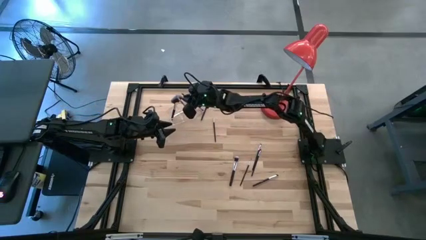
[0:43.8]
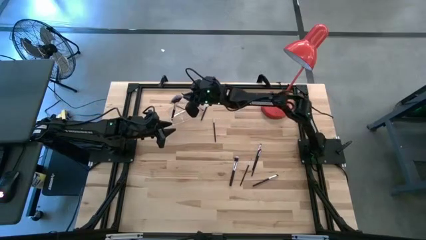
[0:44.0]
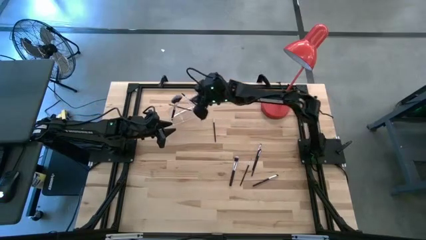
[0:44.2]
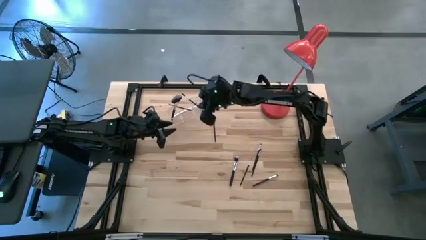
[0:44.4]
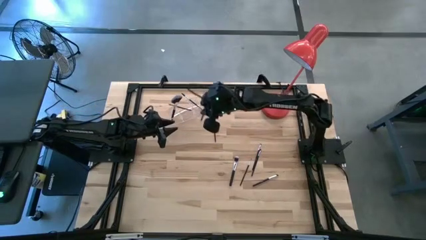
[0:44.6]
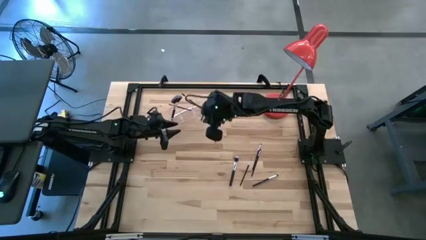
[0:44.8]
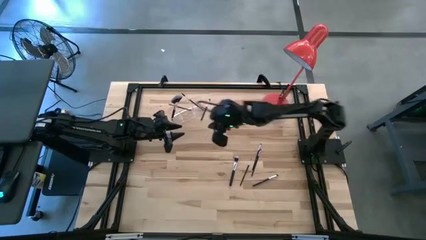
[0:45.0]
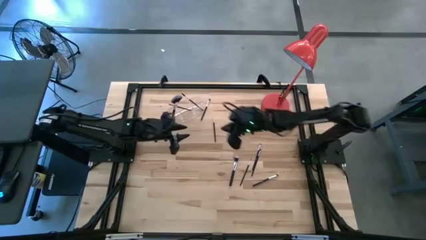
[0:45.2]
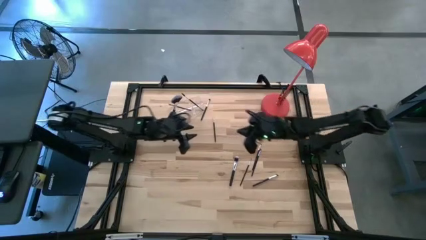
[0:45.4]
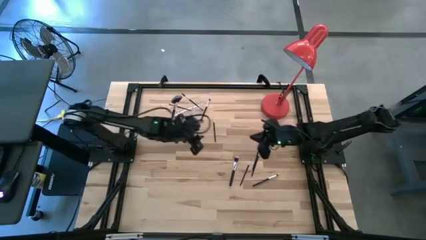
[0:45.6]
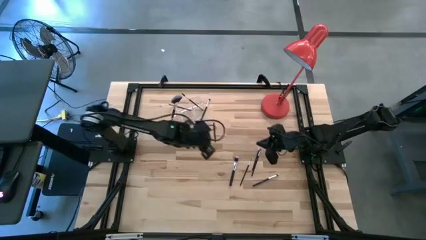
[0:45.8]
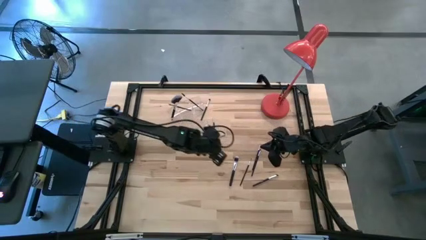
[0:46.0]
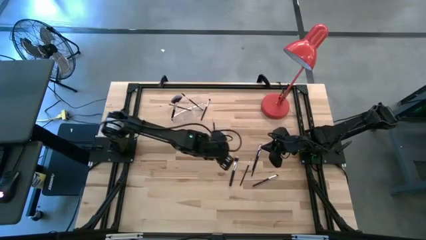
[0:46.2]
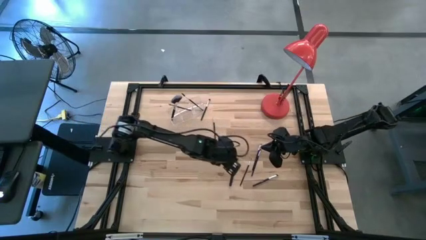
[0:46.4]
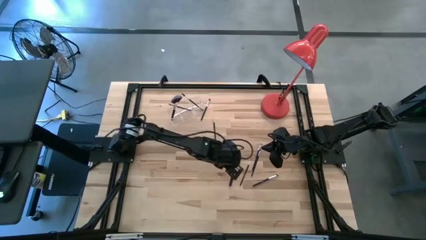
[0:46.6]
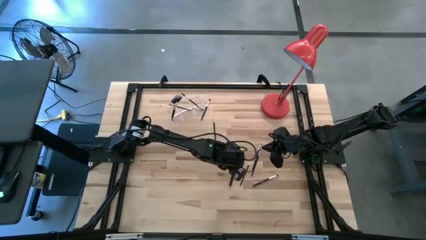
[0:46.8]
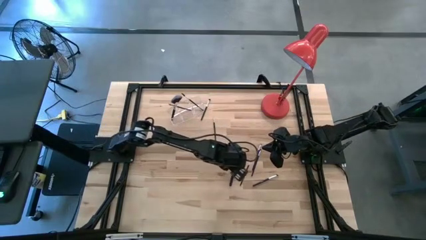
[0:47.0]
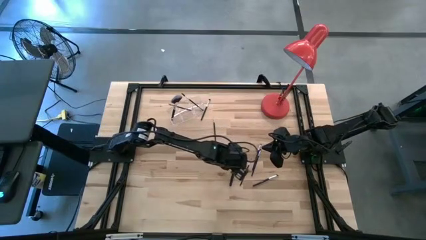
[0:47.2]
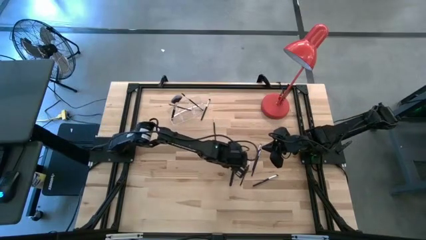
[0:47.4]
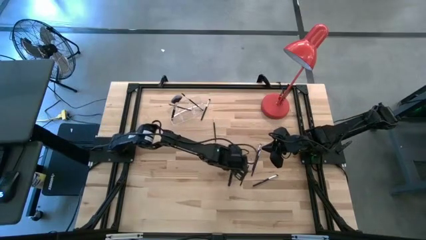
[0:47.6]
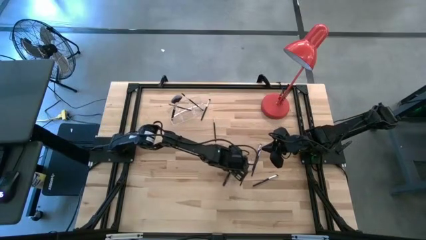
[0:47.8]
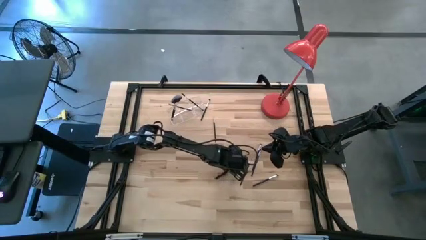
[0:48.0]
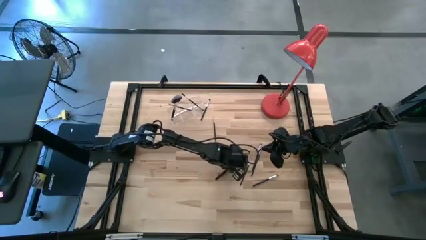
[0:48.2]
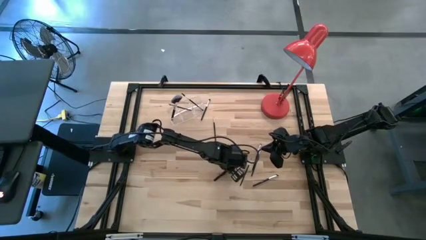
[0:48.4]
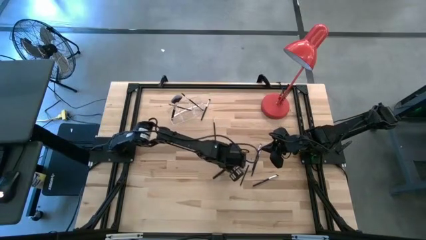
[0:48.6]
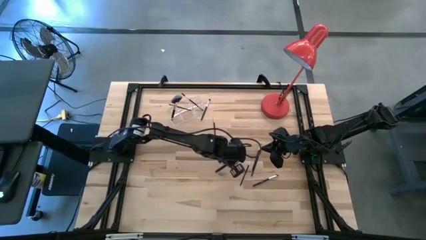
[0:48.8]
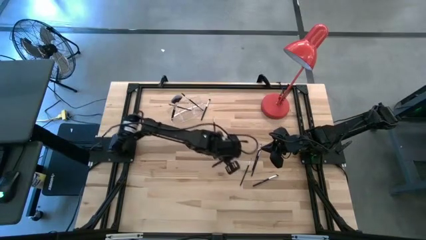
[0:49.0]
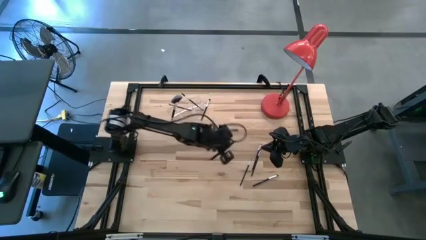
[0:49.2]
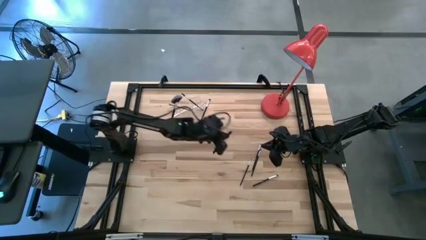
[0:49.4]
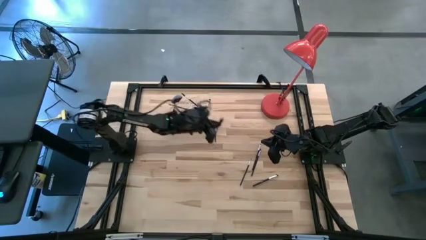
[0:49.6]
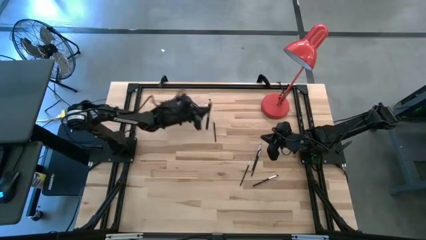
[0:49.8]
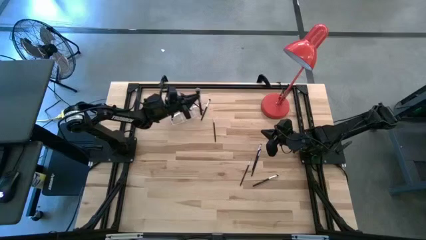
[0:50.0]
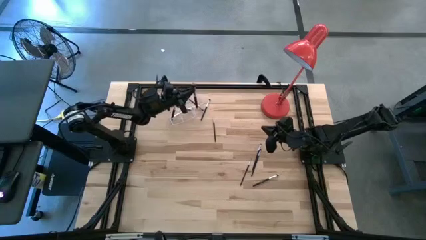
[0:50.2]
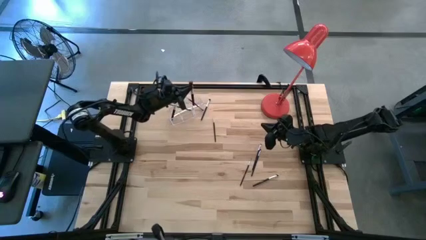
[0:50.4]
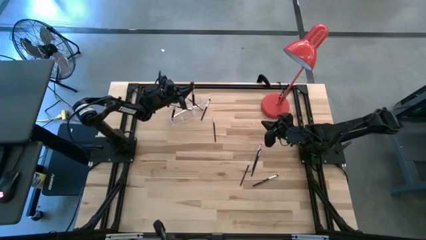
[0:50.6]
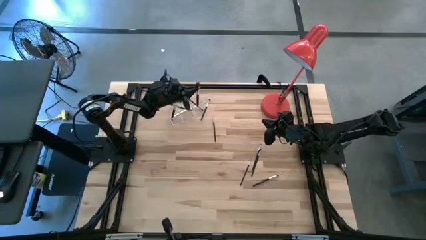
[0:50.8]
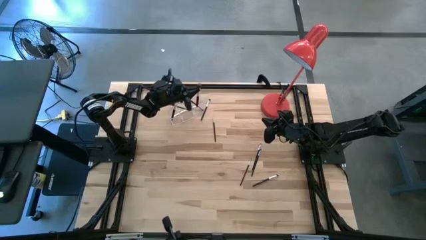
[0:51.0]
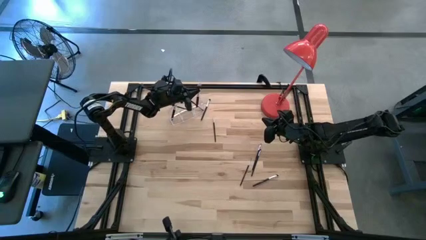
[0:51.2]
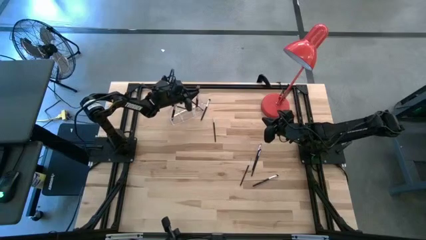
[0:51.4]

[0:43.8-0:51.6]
Task: Put items in baskets/containers
Put the foundation brush into the transparent organizer

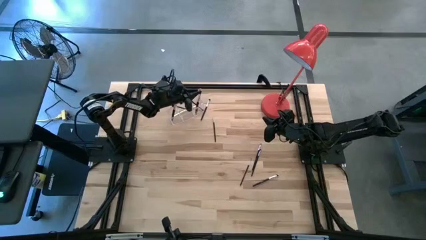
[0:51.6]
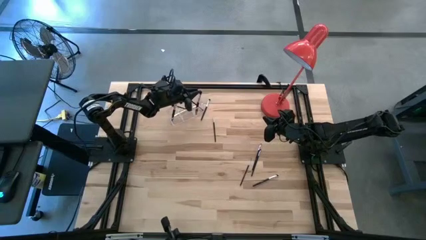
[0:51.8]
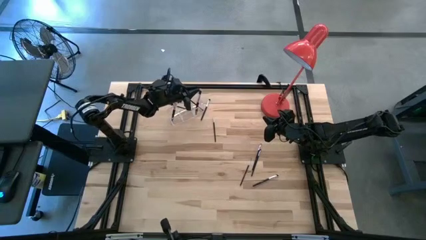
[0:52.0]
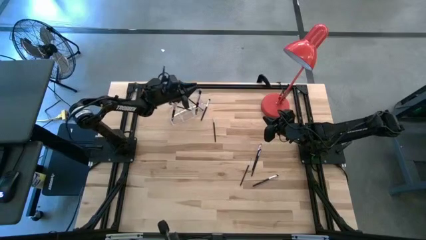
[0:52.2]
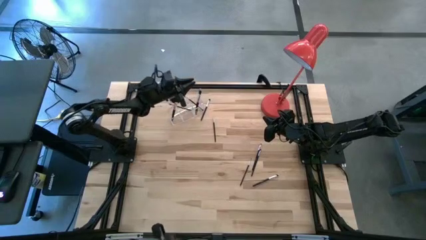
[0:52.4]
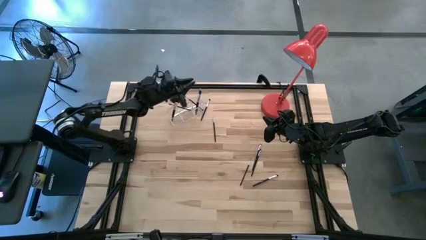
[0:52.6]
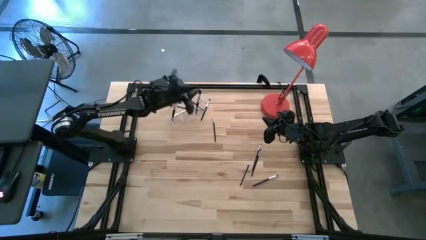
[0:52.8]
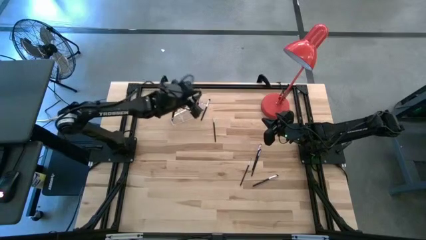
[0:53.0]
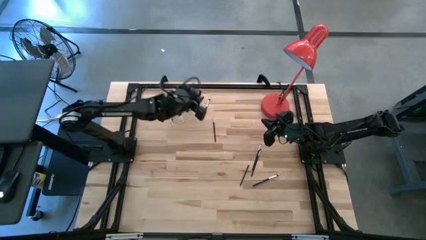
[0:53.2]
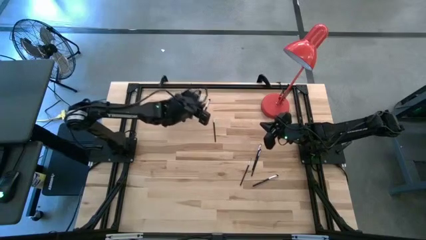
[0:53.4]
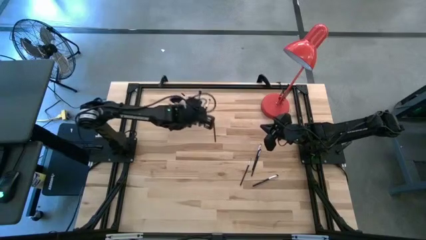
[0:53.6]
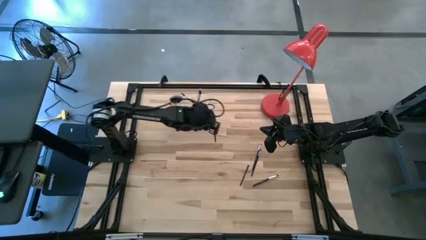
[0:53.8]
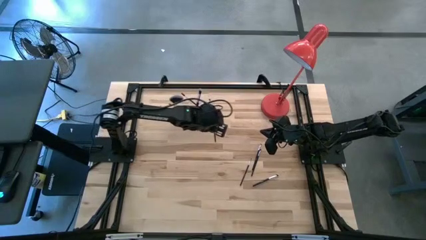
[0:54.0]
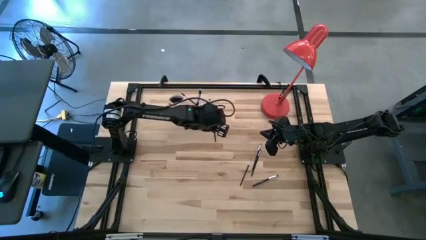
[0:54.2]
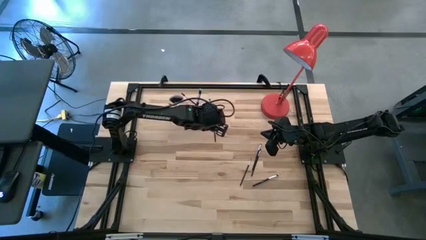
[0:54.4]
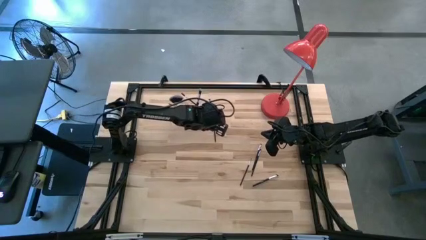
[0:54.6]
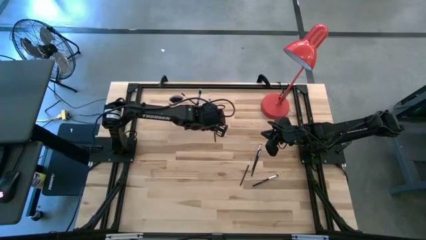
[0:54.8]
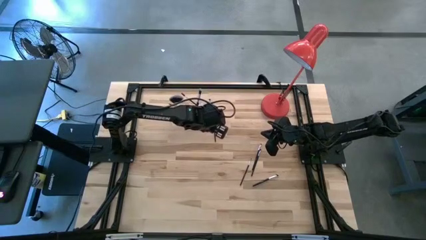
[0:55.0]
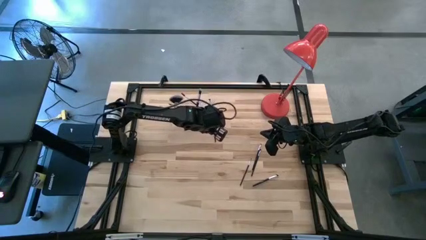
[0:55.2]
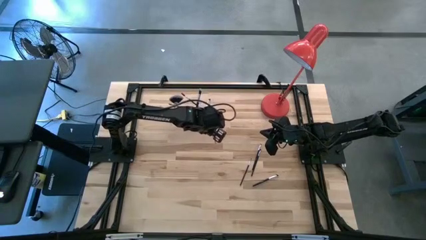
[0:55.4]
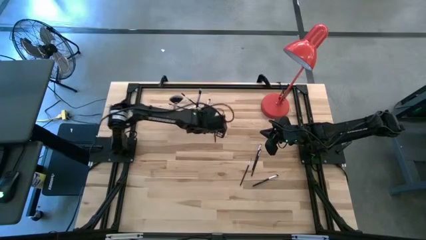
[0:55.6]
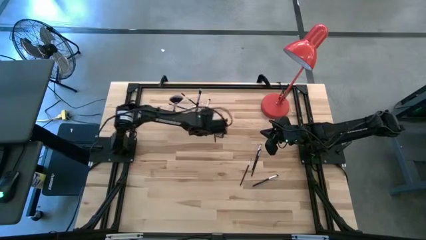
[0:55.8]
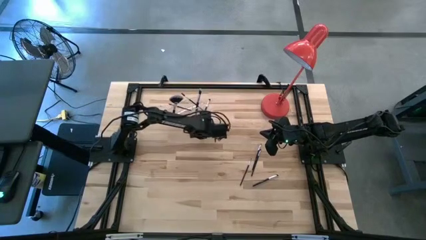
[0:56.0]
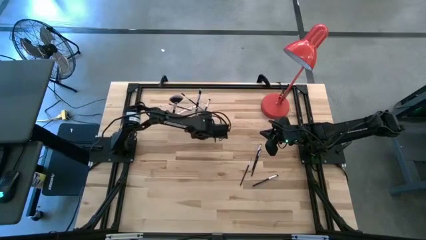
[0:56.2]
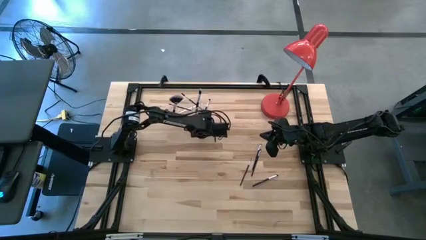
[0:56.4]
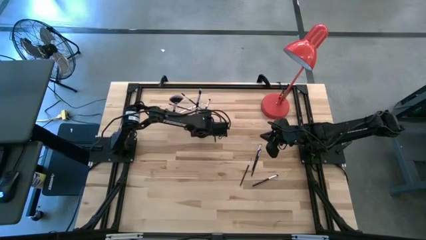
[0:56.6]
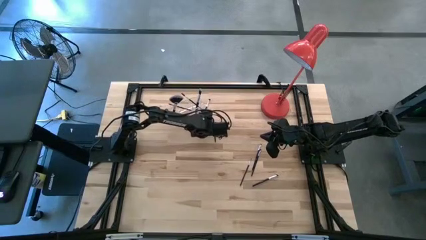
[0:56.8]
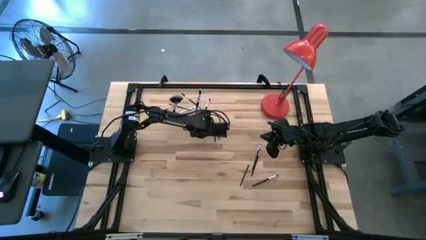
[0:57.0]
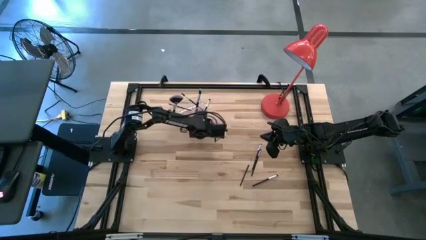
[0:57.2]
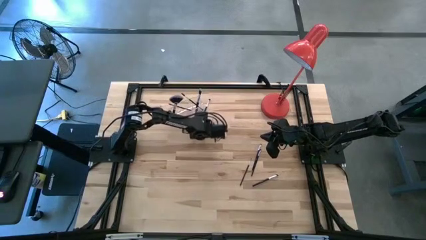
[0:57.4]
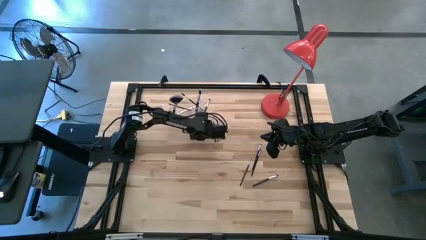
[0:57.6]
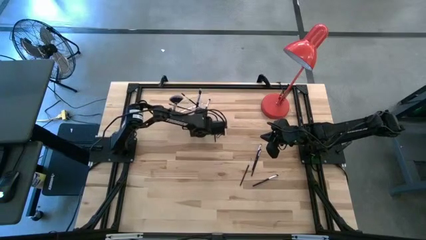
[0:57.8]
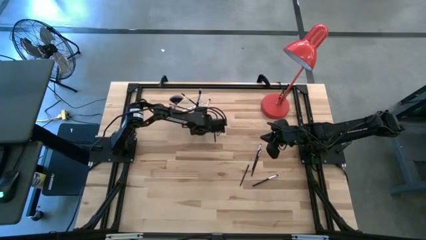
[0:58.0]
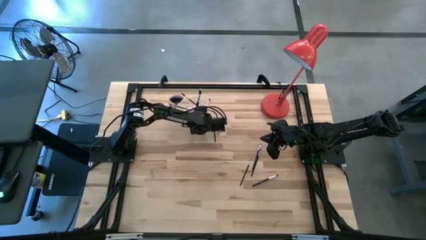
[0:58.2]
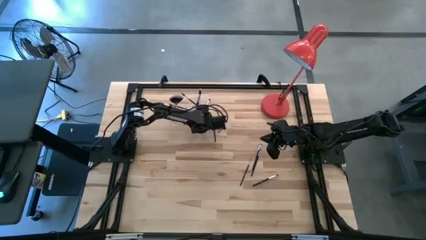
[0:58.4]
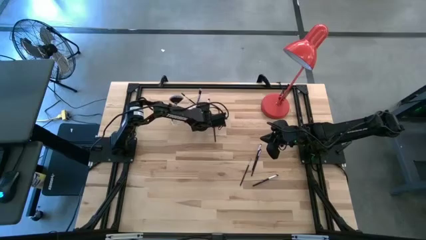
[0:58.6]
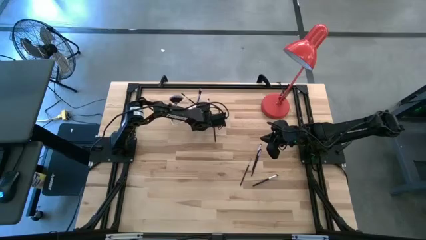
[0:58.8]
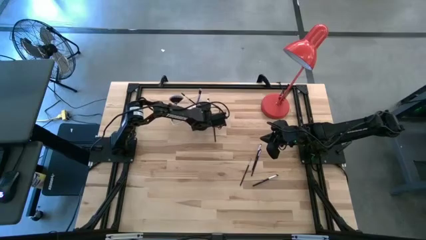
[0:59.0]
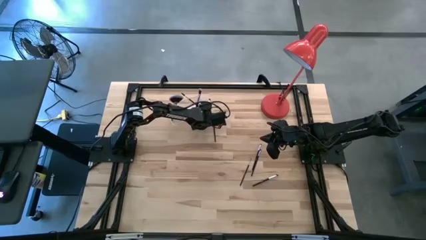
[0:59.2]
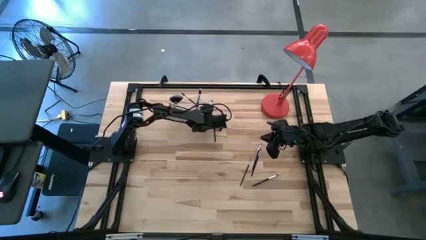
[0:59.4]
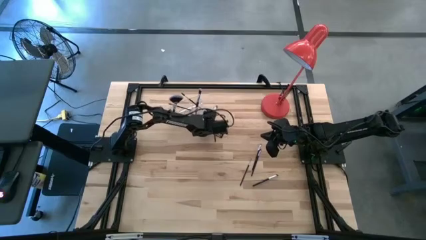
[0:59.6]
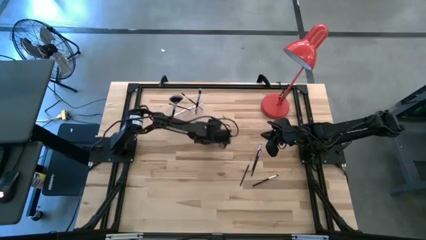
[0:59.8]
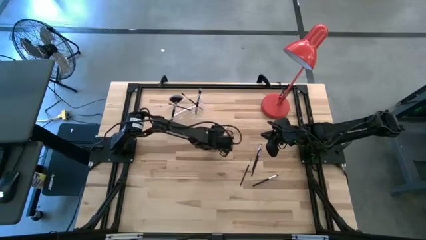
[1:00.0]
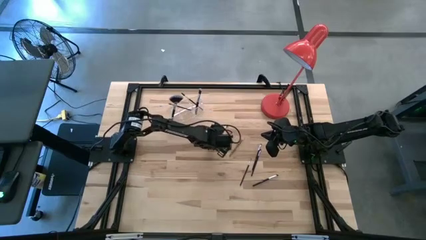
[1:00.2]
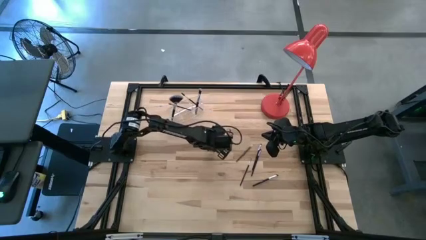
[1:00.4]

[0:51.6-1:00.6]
Put the eyeshadow brush into the transparent organizer
